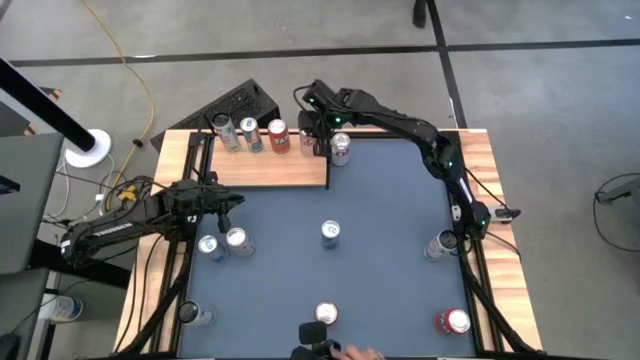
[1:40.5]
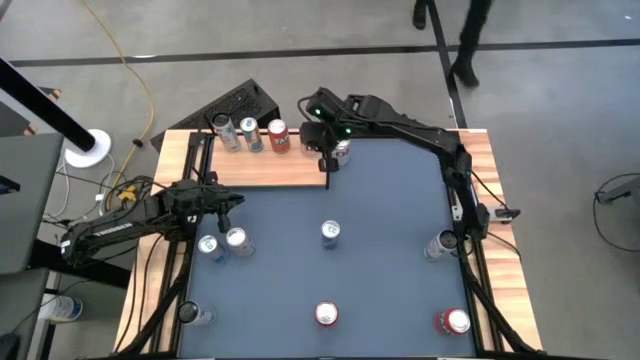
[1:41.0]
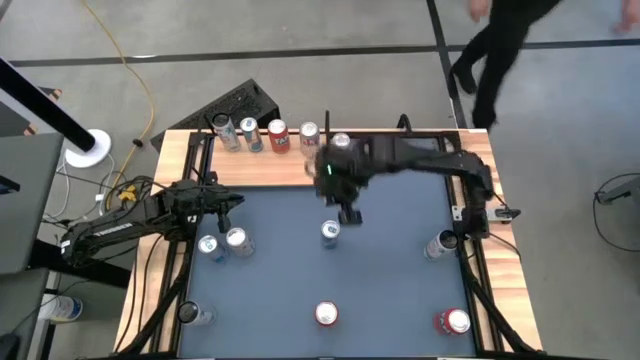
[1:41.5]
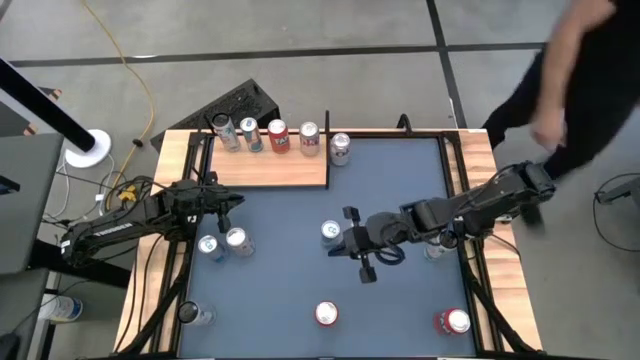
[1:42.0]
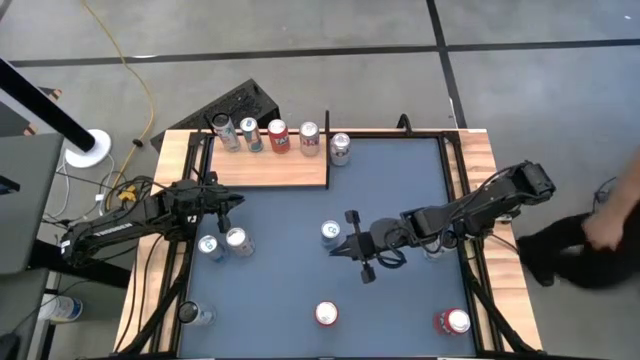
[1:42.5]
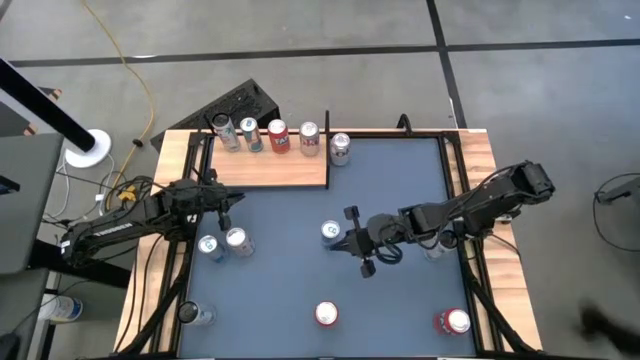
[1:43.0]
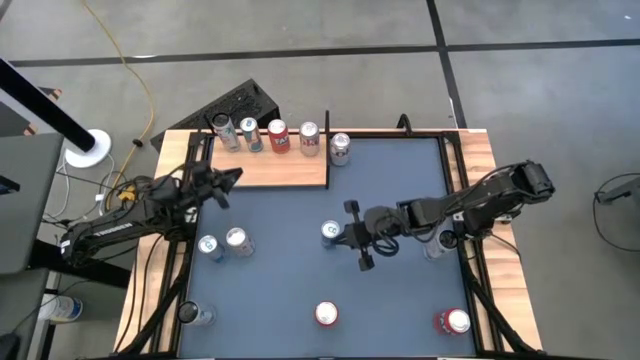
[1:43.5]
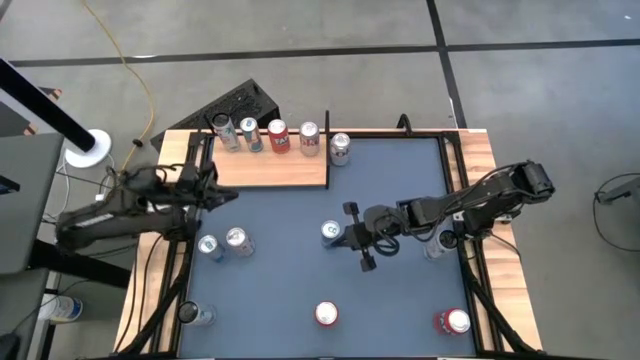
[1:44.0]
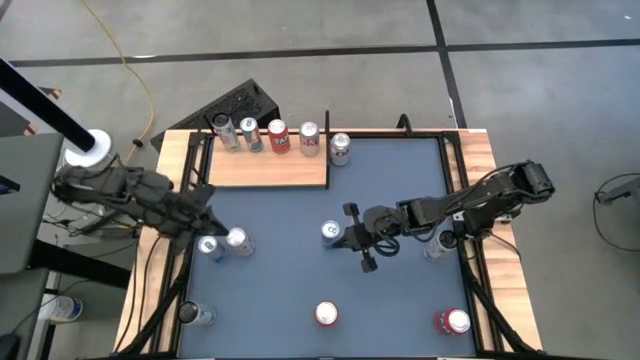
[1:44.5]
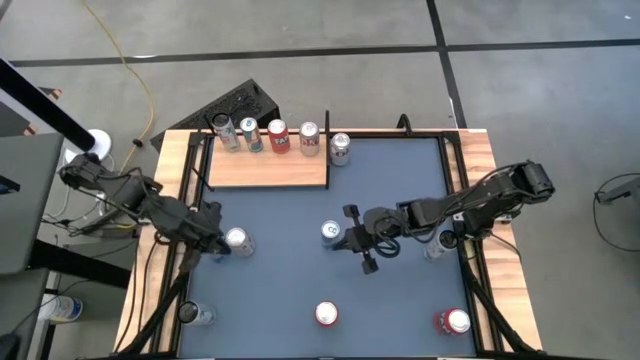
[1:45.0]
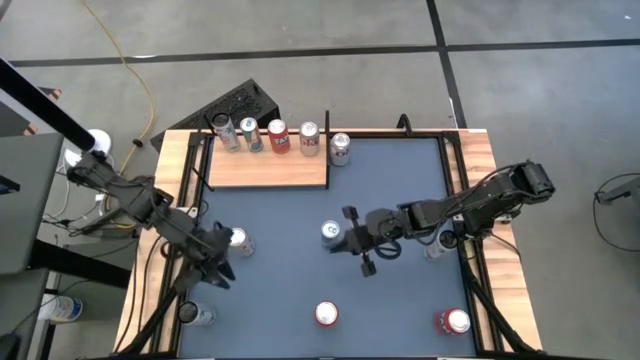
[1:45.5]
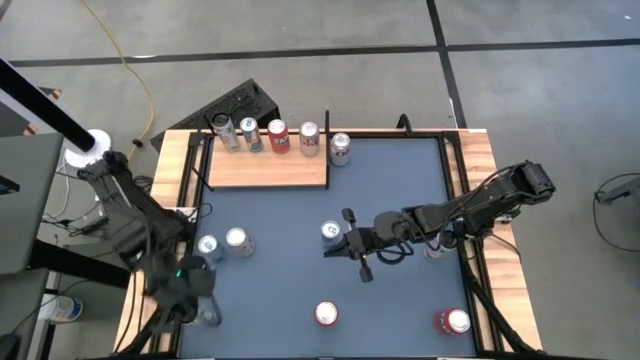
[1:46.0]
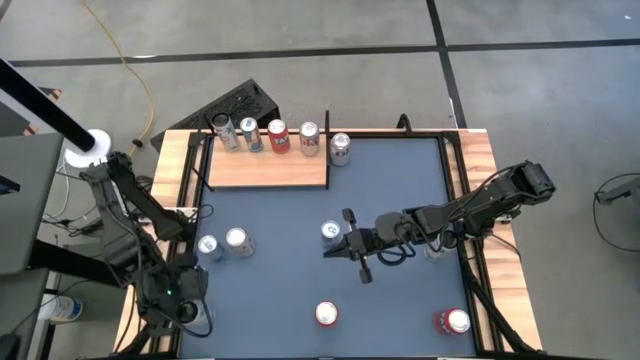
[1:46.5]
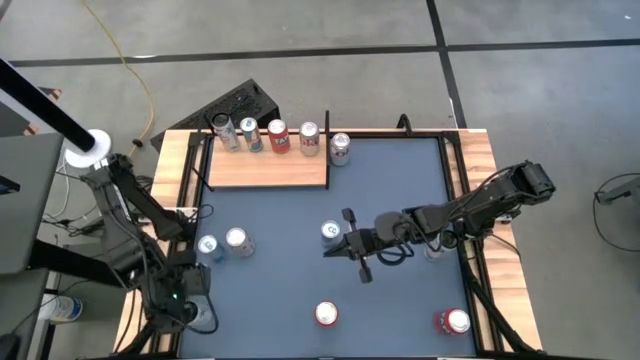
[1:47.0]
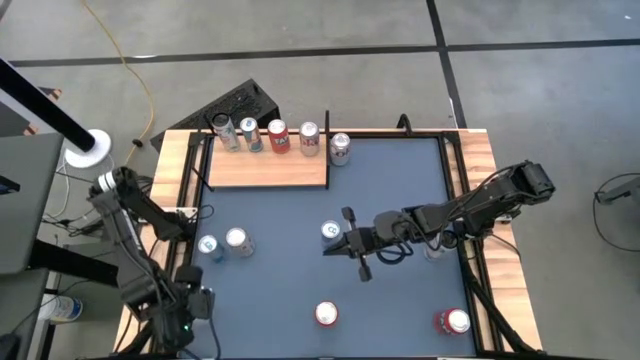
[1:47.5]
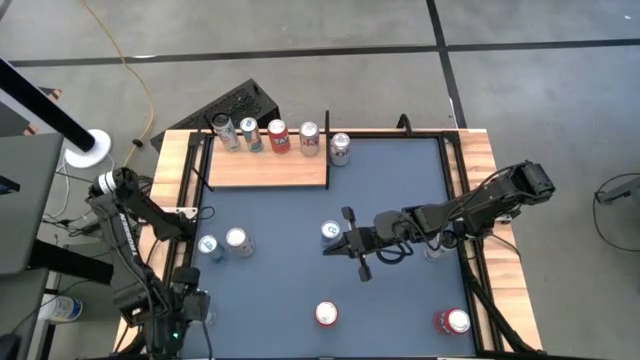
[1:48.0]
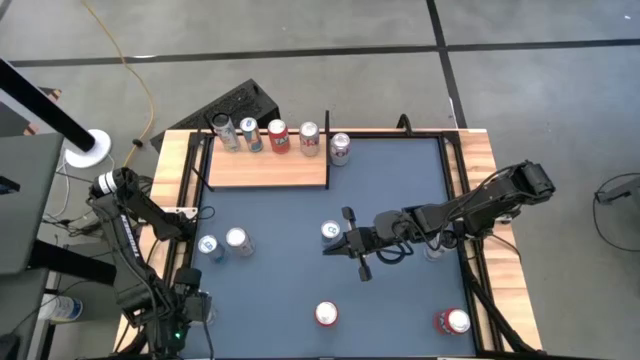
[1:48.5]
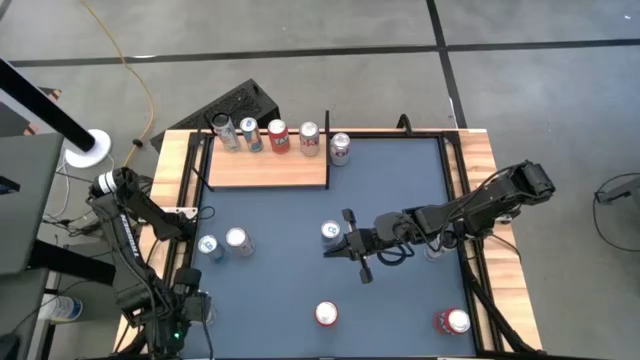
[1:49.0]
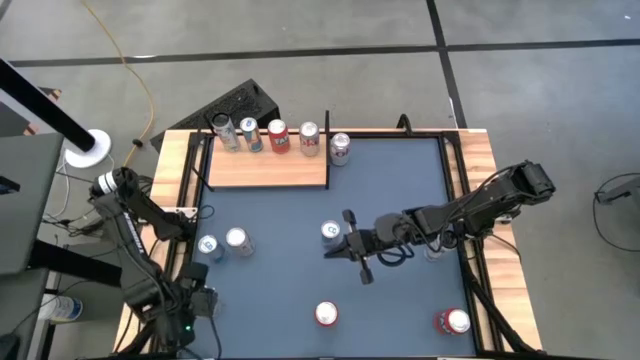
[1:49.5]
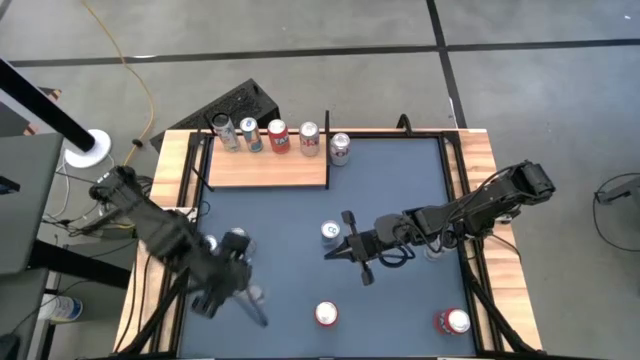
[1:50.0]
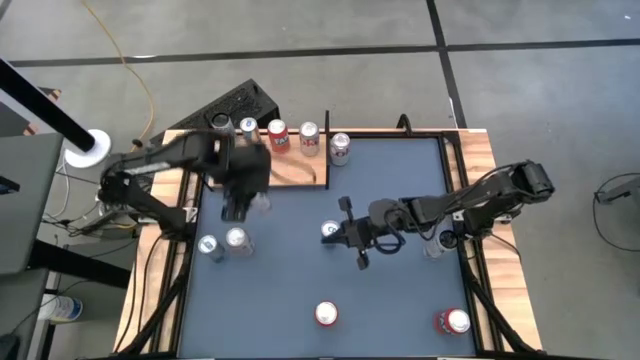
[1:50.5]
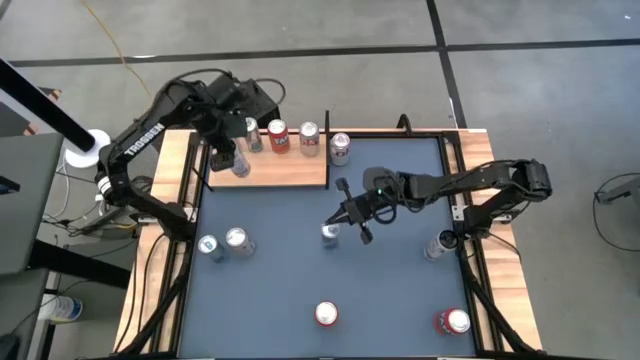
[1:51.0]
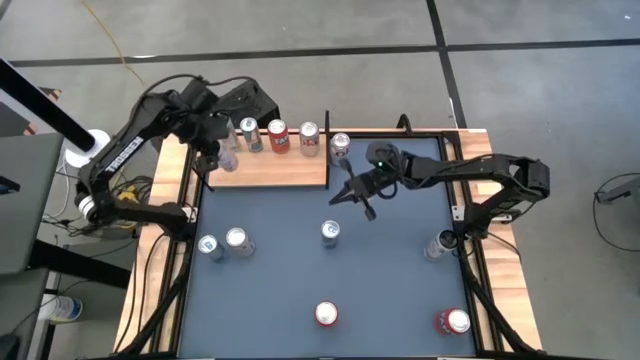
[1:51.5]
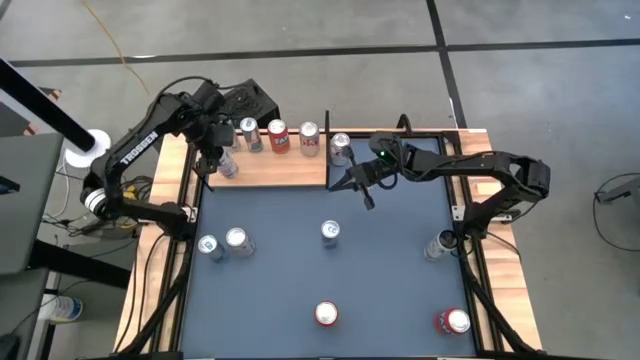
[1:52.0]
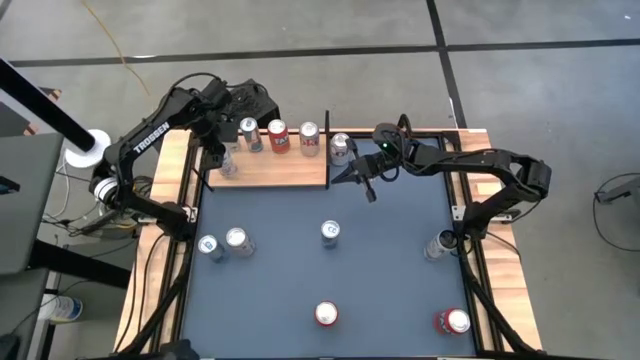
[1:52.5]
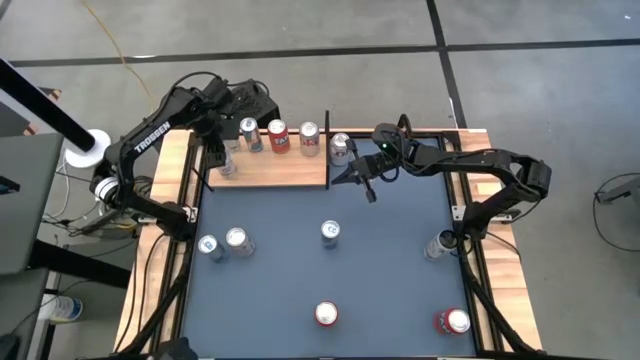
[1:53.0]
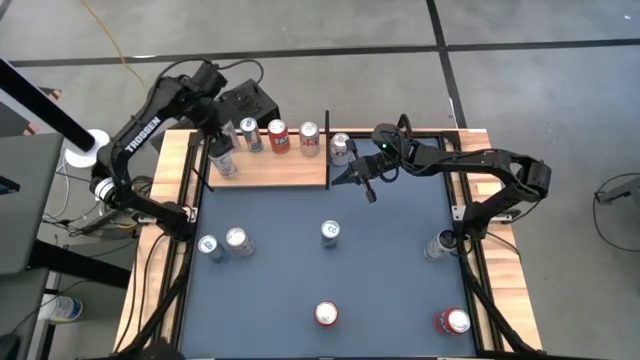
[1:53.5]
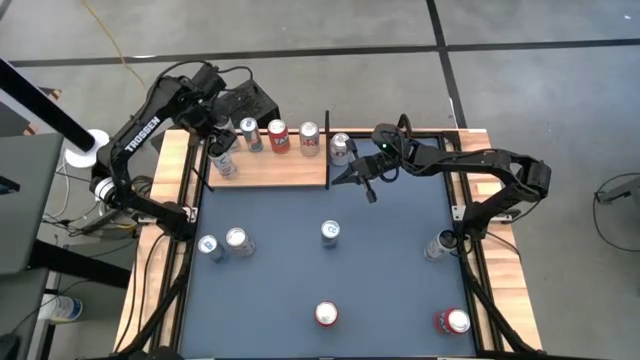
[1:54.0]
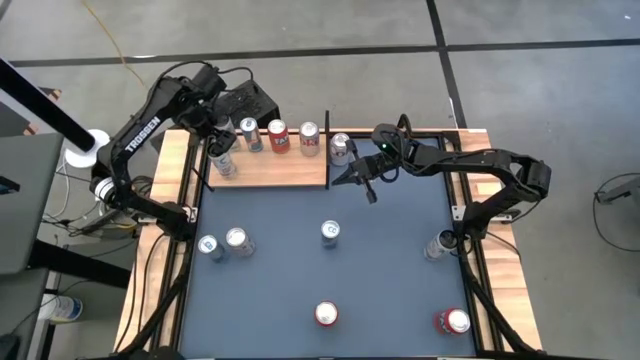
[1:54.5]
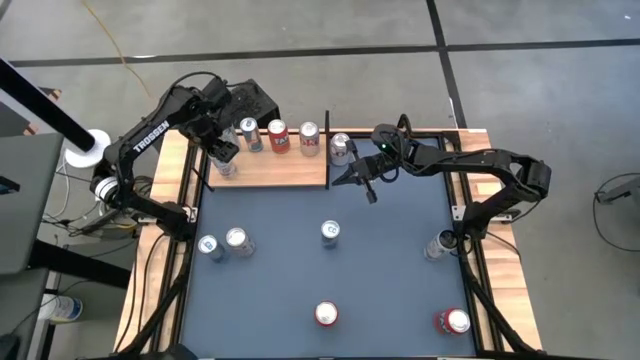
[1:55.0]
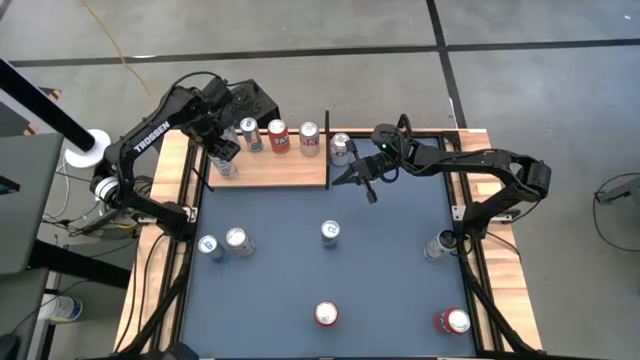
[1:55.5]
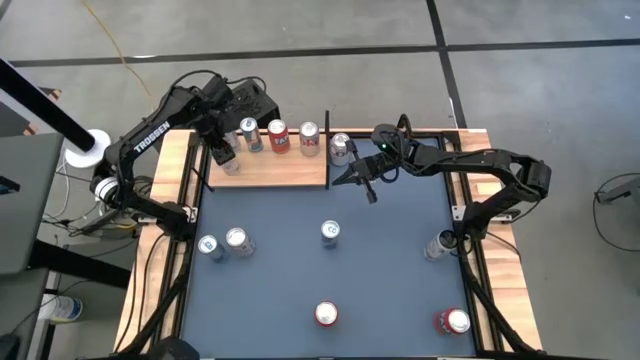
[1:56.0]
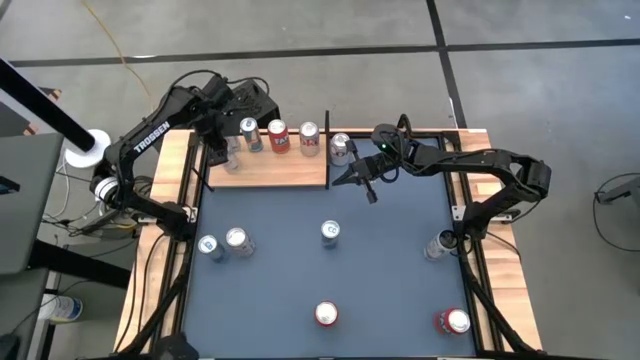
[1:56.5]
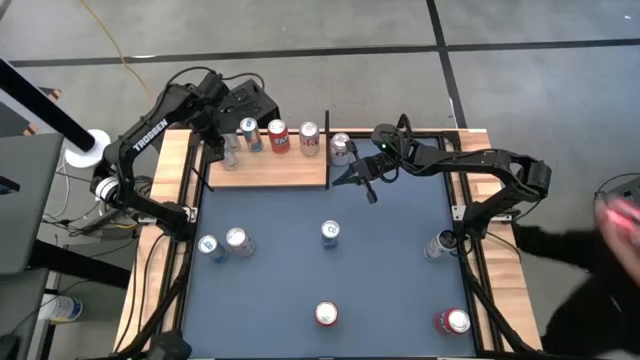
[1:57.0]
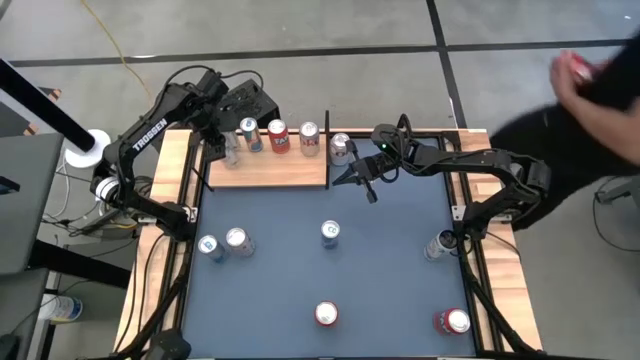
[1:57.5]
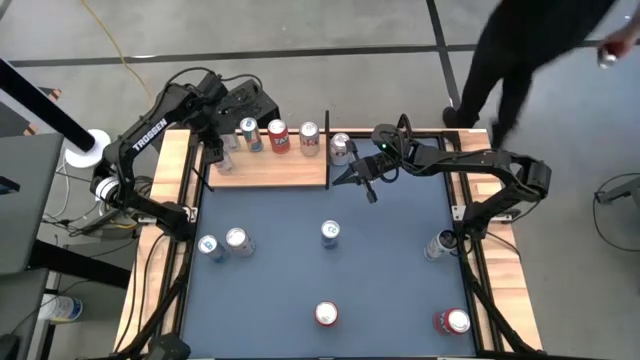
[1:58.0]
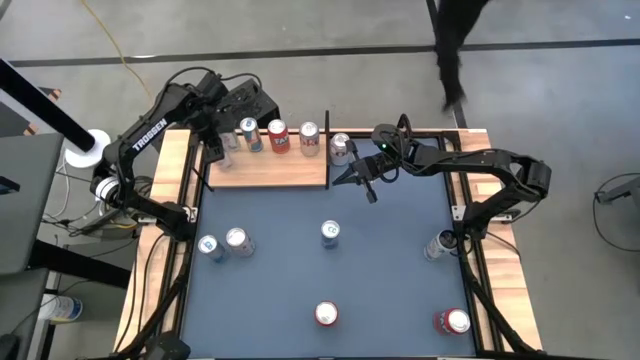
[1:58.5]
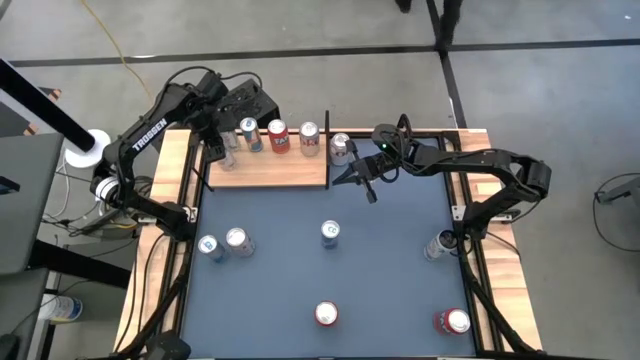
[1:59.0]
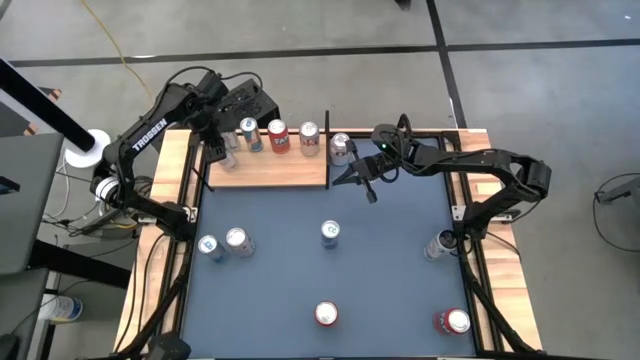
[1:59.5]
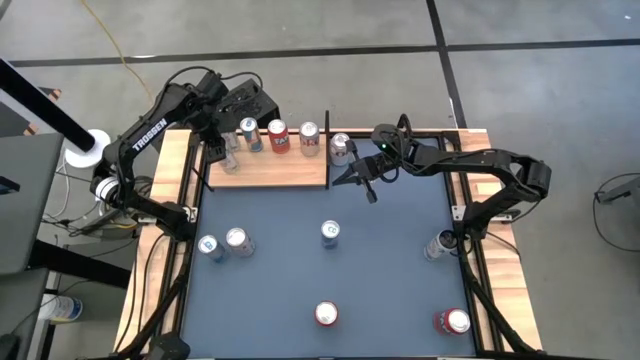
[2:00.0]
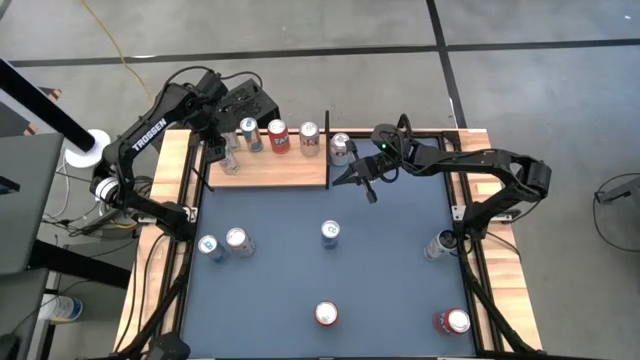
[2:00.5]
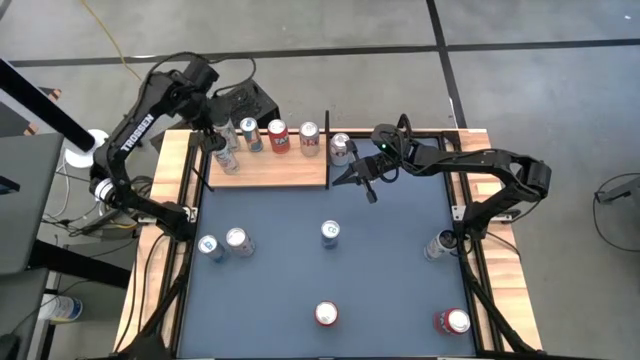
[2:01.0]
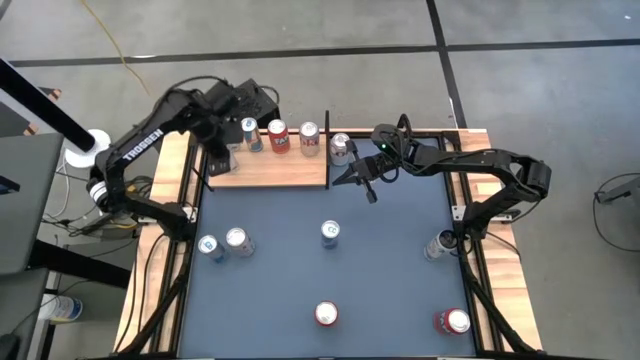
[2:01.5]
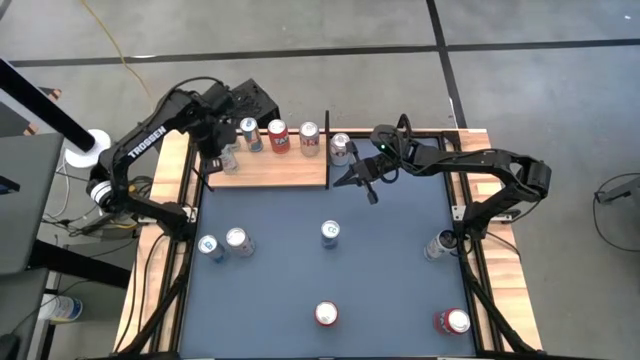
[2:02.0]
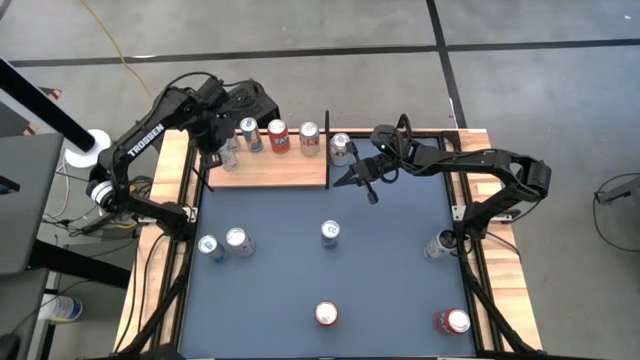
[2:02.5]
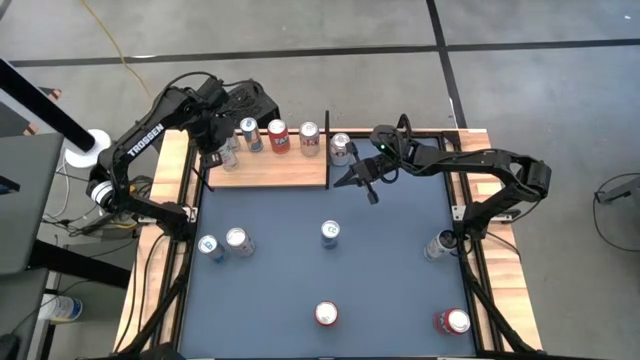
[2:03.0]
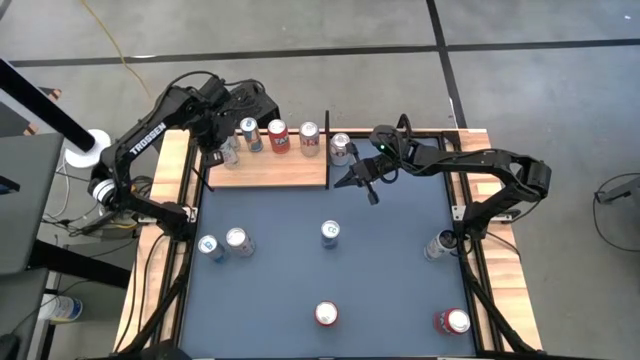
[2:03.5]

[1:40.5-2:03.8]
Task: Place canned beverage on shelf
Put the bottom white pink soda can on the shelf aligned with the other white pink soda can
